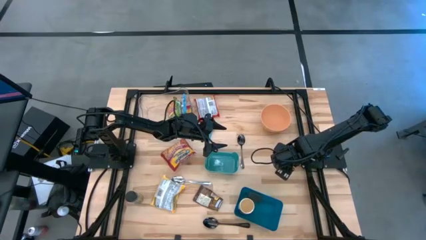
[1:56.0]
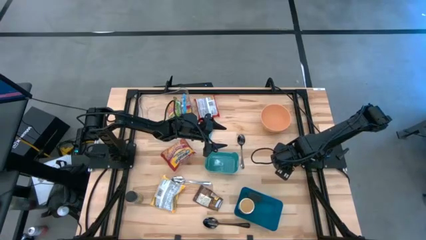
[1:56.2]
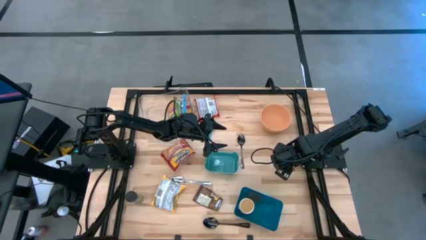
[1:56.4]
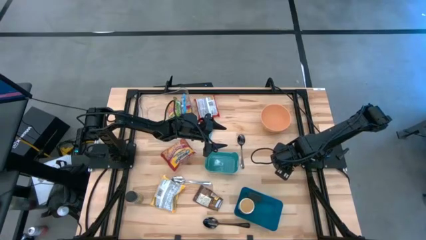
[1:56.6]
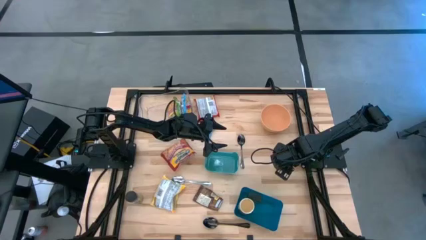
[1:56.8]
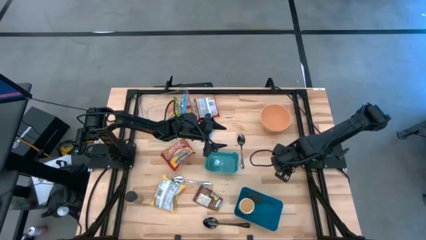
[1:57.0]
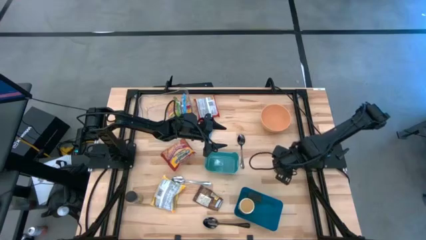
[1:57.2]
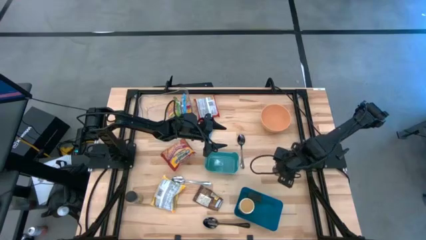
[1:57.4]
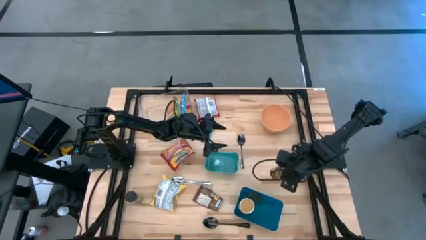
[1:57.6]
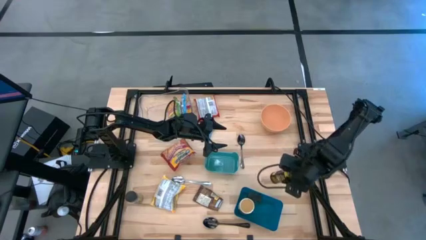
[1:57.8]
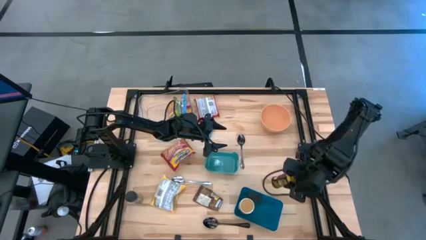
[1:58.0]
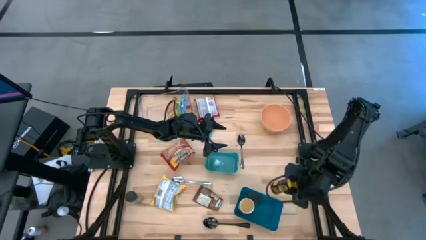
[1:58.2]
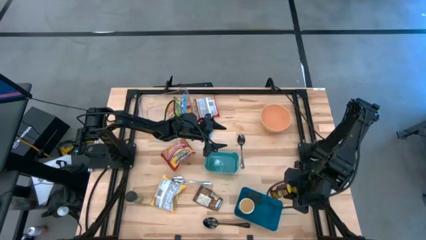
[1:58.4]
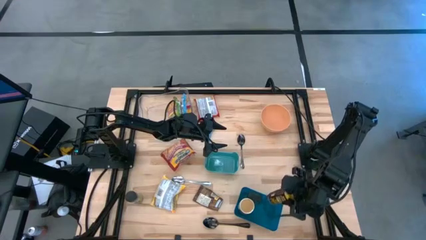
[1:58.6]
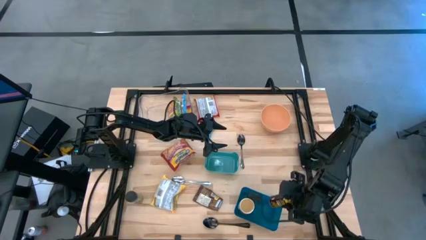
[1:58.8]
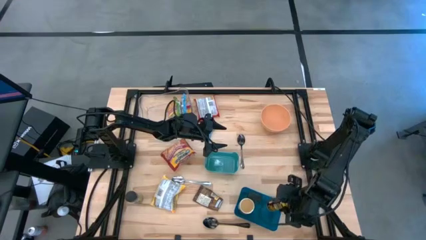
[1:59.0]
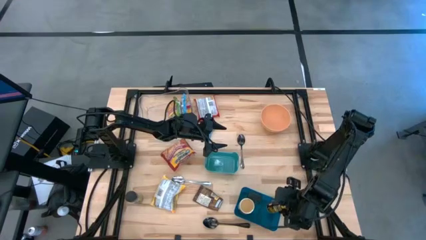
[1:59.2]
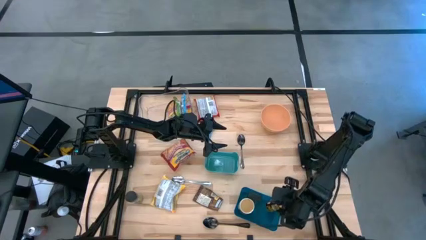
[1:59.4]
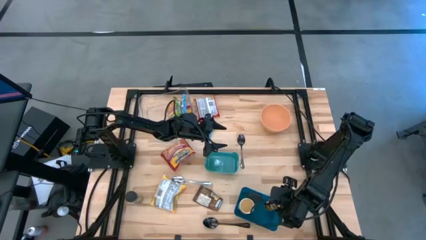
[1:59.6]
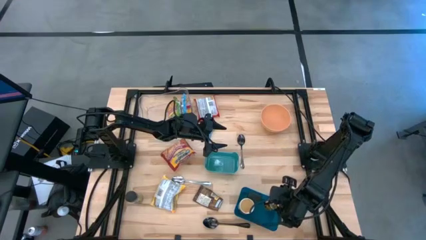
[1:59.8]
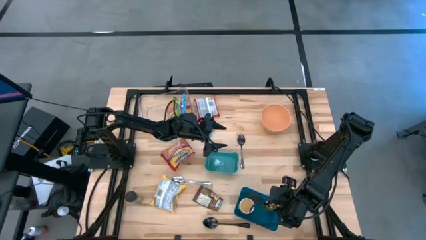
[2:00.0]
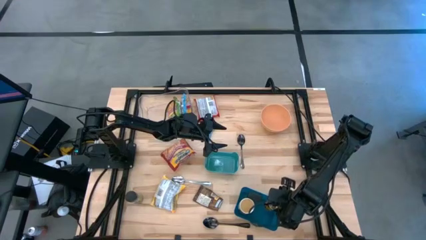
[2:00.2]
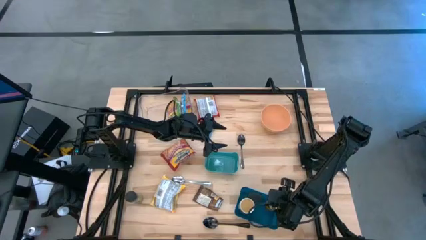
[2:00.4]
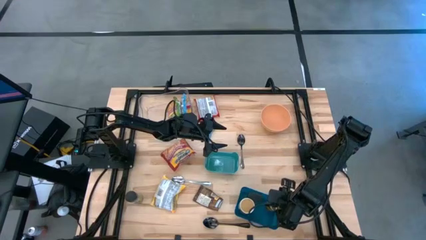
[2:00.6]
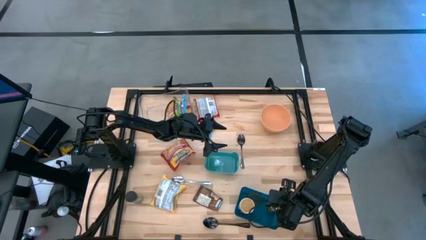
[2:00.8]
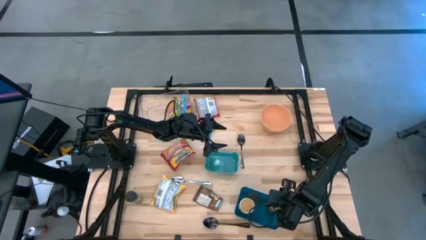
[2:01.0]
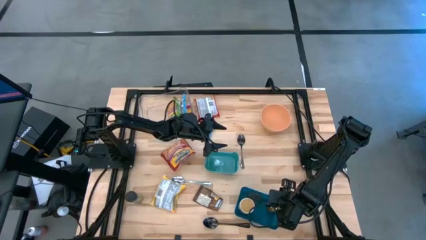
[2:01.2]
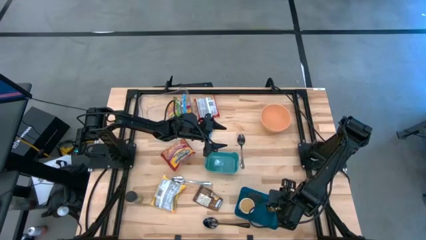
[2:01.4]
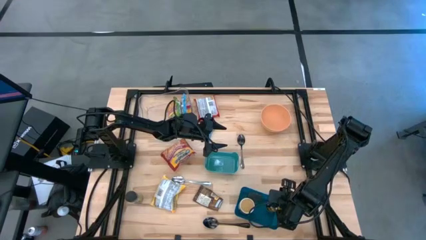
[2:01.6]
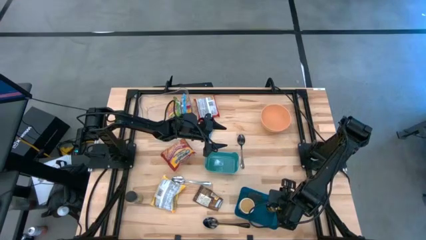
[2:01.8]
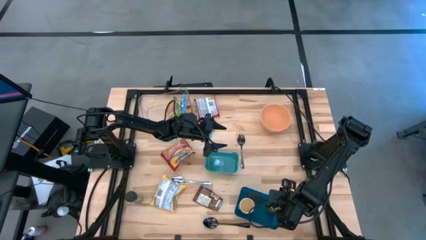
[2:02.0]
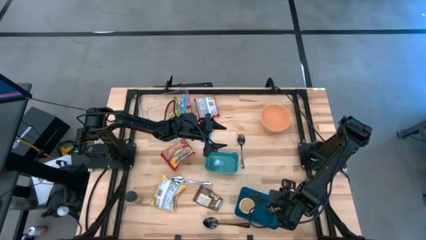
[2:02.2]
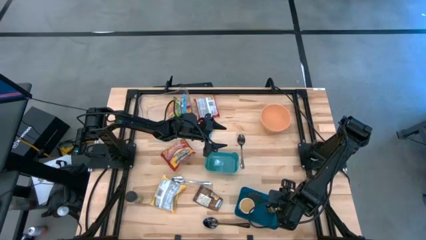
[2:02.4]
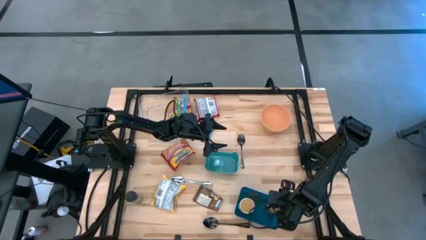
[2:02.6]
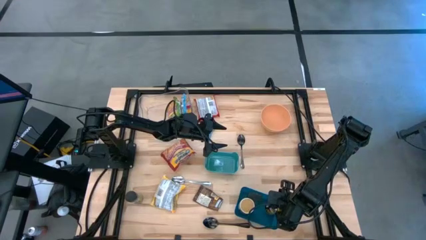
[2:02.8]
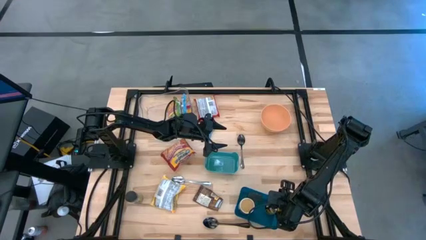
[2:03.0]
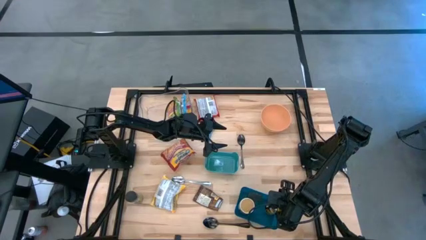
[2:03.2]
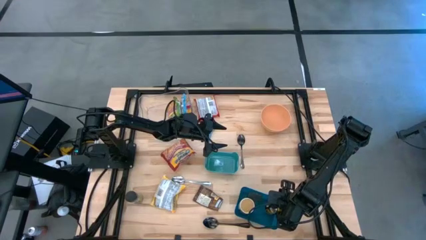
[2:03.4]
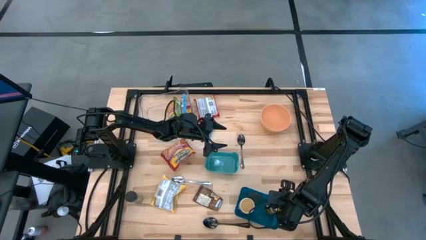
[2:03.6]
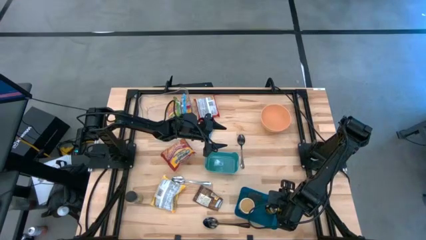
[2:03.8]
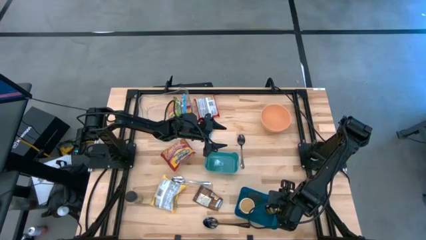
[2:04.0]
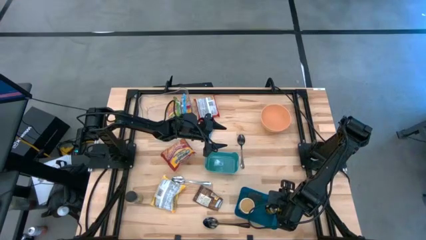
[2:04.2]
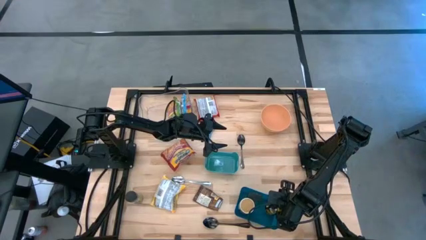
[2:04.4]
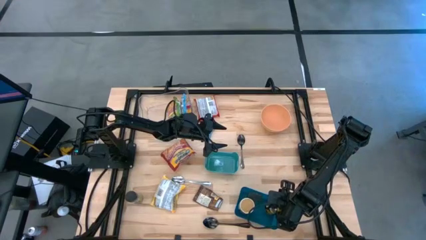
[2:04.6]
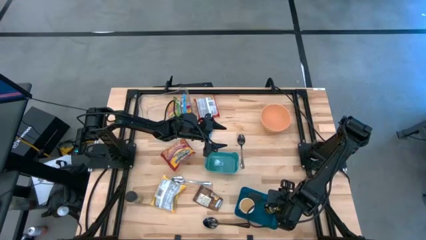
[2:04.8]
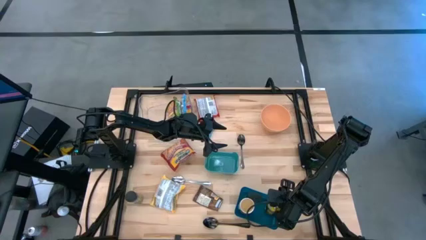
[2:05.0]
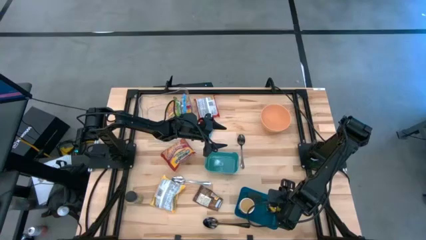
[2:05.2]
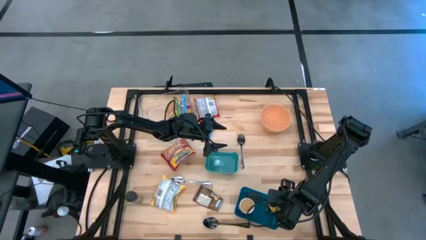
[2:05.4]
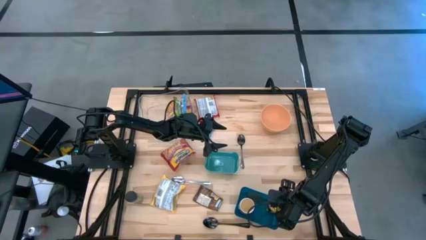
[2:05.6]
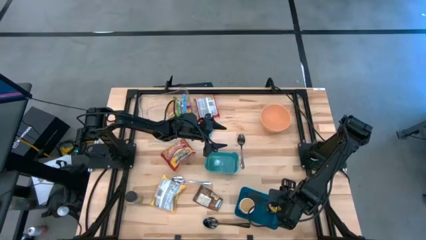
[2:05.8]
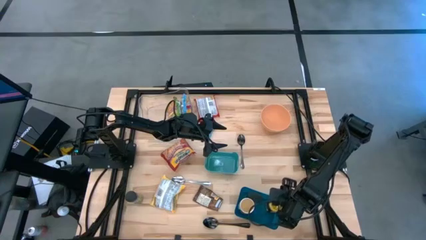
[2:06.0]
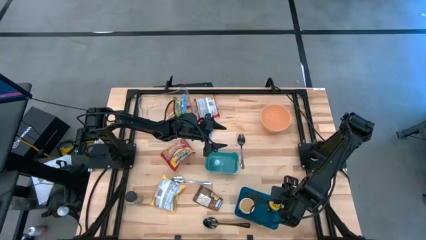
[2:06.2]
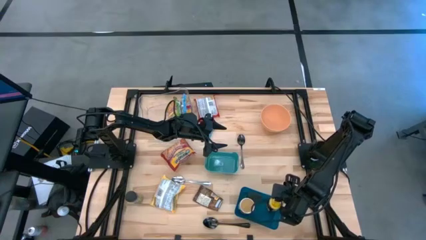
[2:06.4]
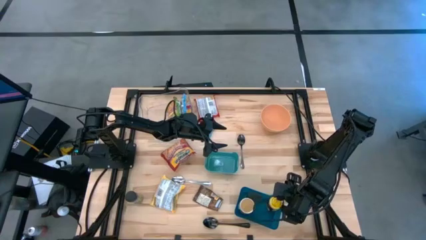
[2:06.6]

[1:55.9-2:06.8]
Task: Pick & Place Food Item
Put the yellow seasoning bottle into the blue bin
